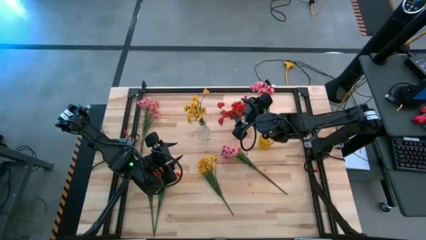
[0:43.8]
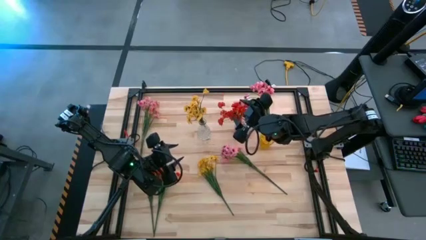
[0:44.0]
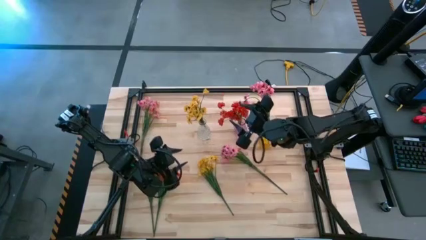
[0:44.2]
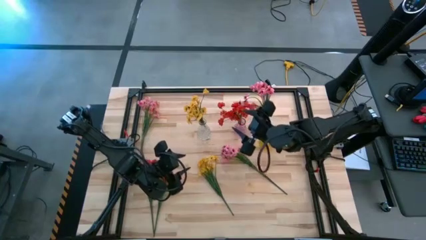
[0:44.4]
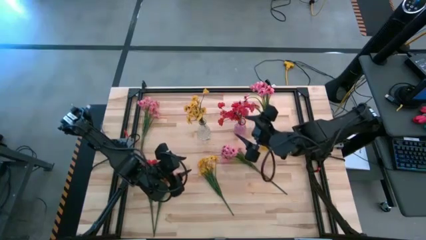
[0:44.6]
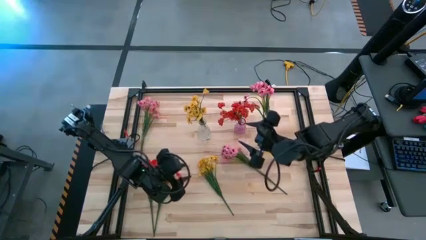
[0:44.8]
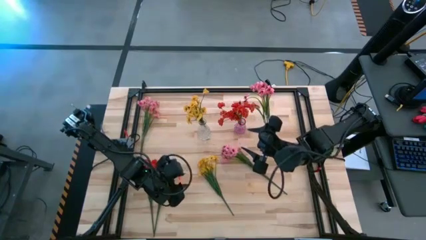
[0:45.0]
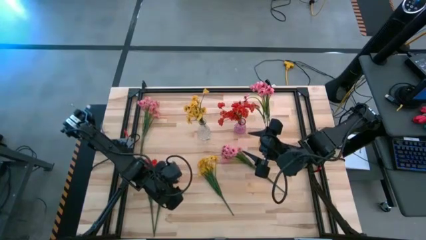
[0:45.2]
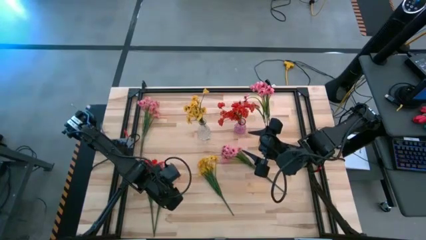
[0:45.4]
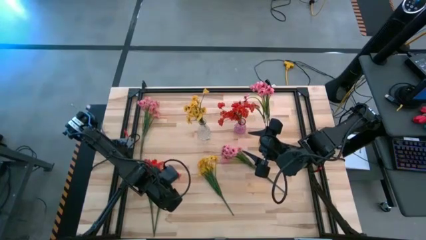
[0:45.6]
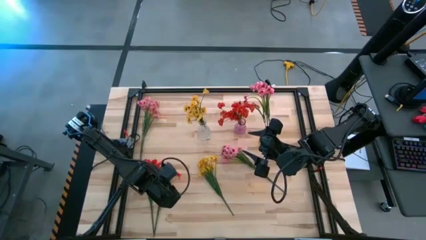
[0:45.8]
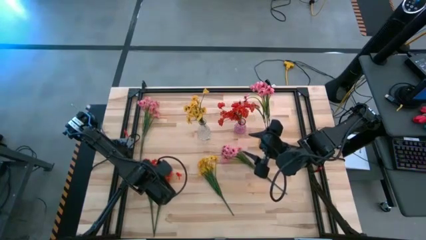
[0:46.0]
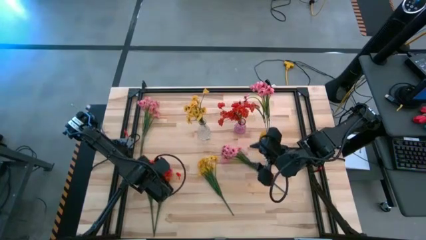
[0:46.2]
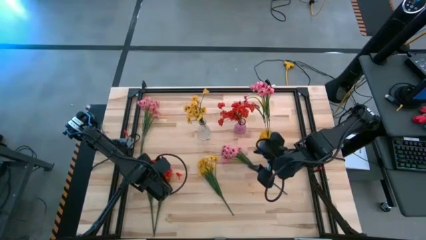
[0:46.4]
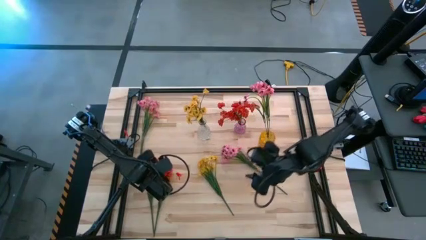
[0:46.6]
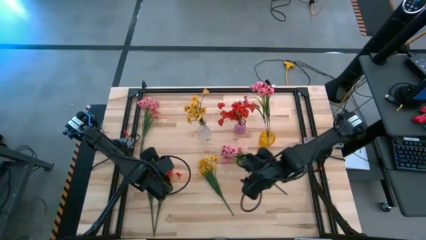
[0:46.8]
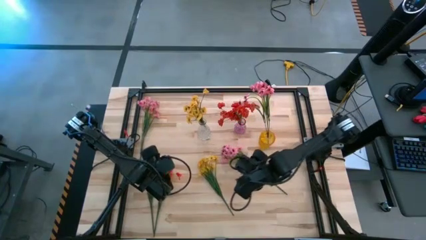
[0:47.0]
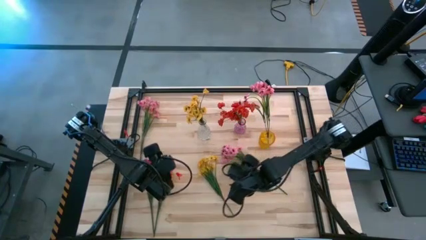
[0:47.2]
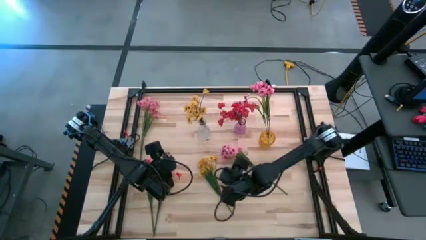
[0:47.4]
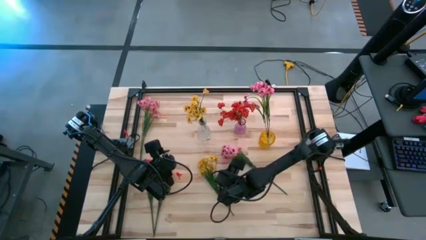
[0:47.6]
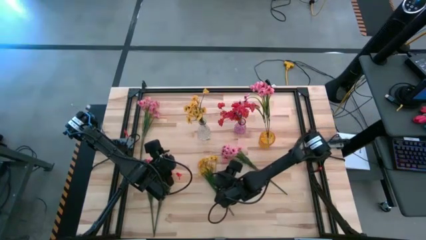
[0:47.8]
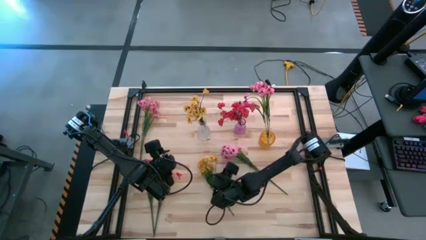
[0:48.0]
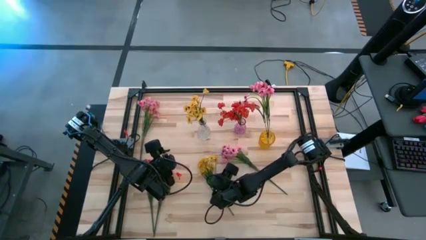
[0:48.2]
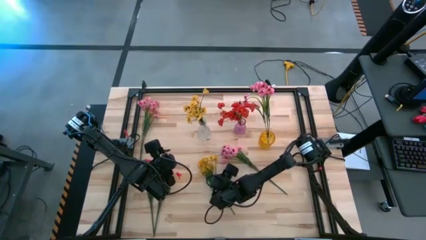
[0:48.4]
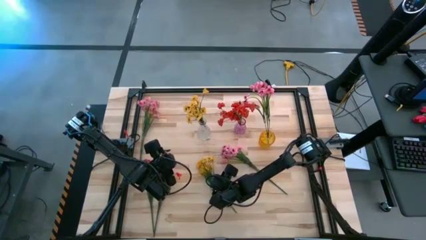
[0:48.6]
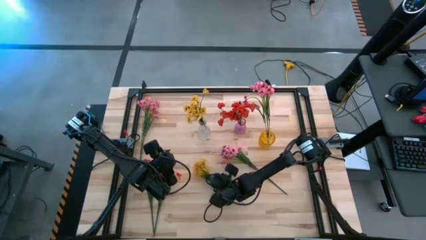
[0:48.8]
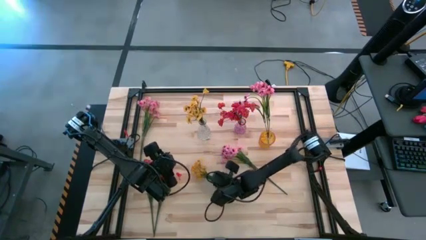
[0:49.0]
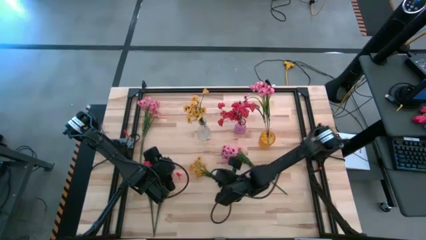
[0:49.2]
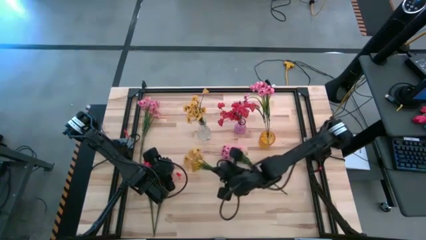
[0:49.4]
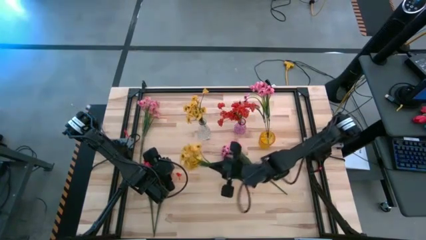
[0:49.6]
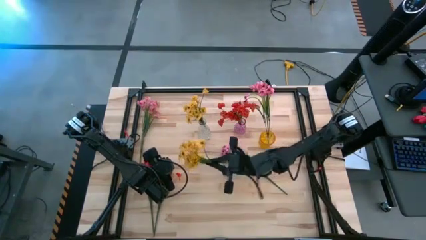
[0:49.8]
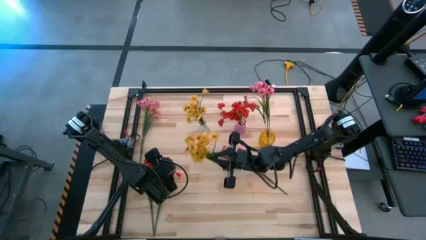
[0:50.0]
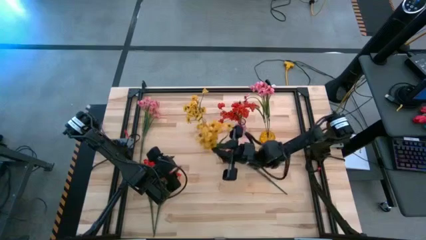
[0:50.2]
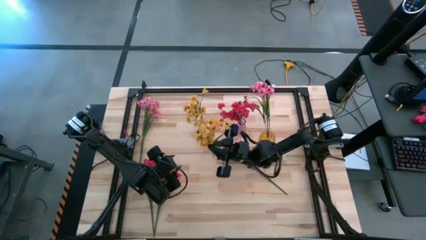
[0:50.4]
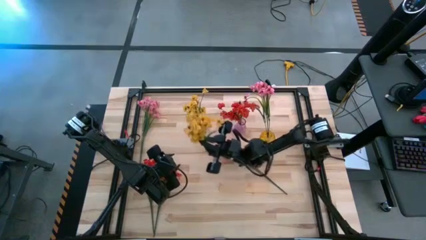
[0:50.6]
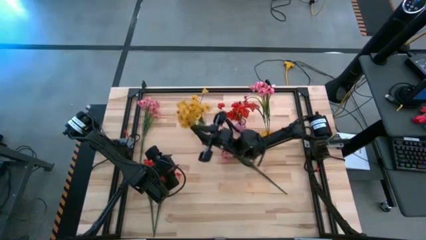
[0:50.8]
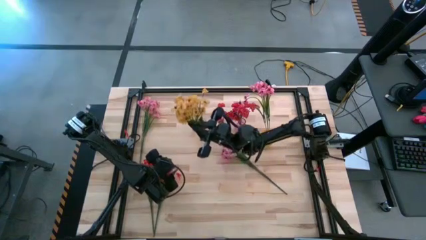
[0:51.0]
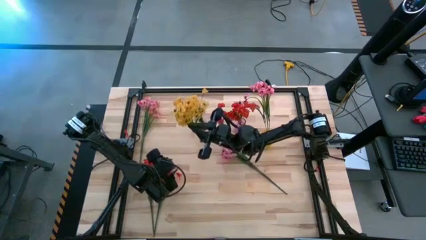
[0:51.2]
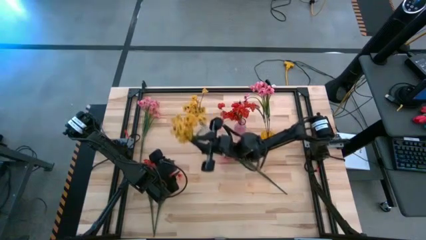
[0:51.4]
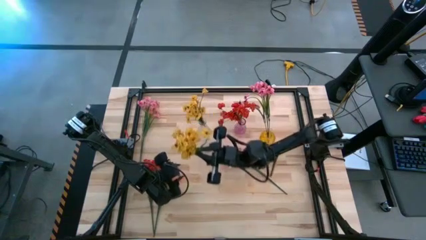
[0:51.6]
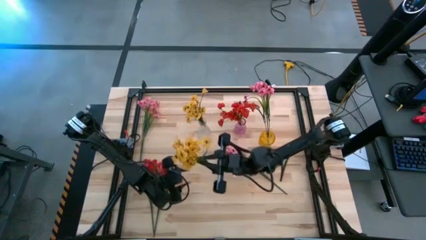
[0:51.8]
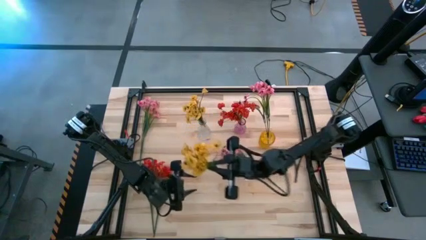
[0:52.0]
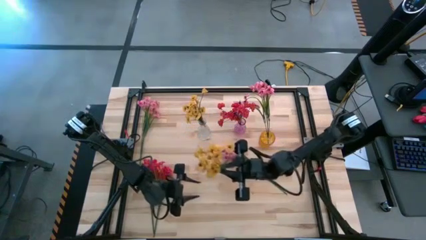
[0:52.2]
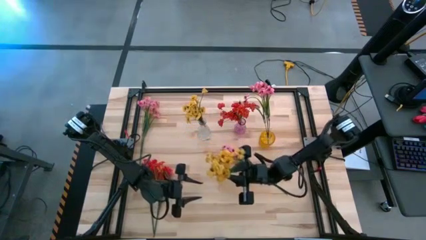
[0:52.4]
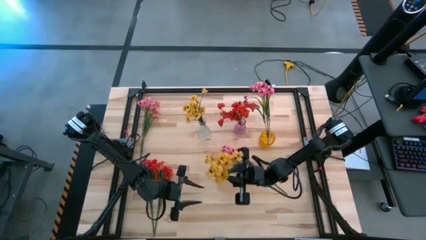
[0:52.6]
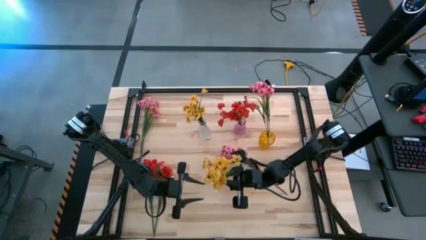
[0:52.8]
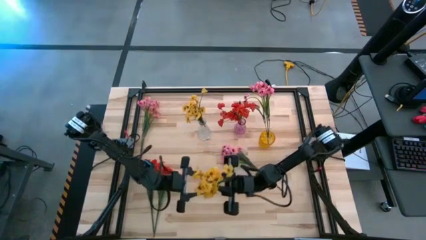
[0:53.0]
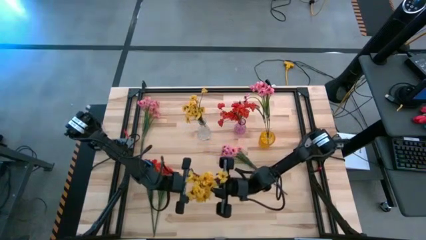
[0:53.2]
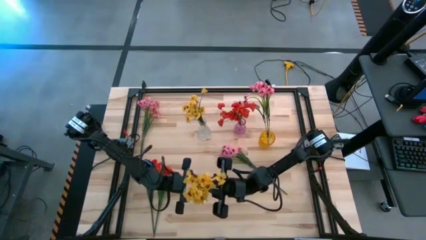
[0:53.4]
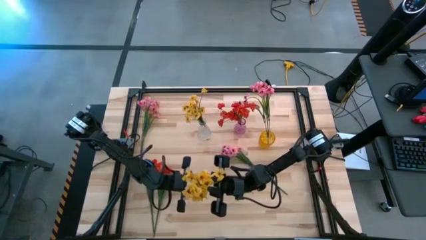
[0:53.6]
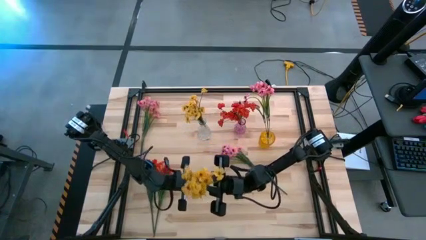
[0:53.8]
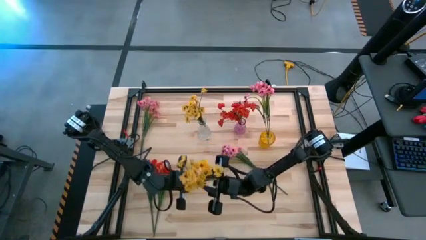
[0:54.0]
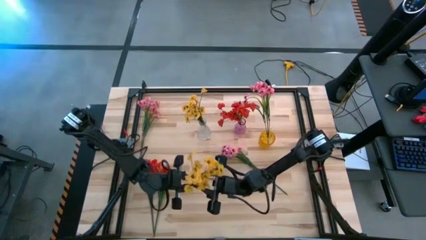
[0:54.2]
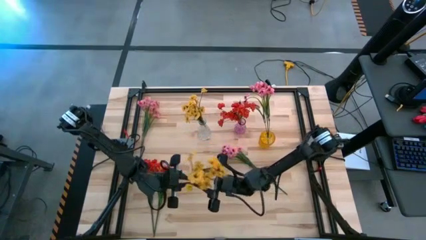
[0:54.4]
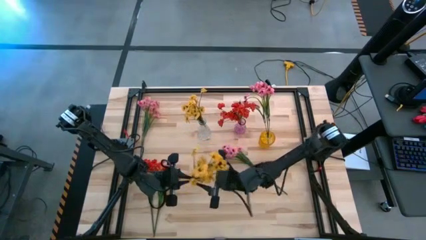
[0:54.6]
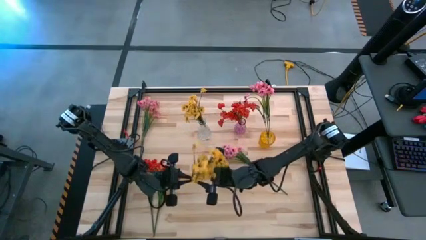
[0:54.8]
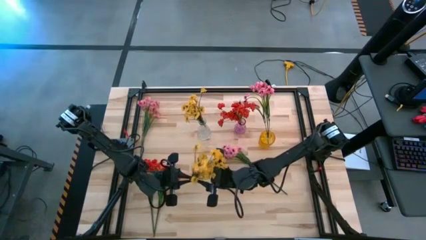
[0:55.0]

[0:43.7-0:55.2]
Task: Sort flowers into vase by color
Put the yellow flowers into the transparent vase

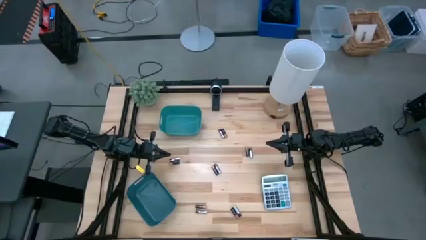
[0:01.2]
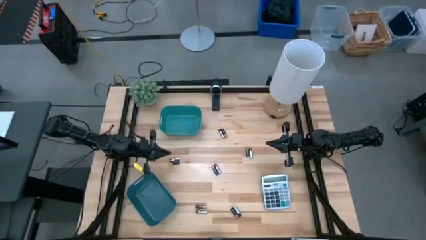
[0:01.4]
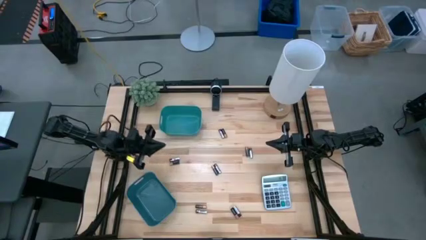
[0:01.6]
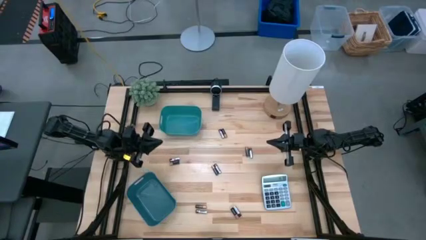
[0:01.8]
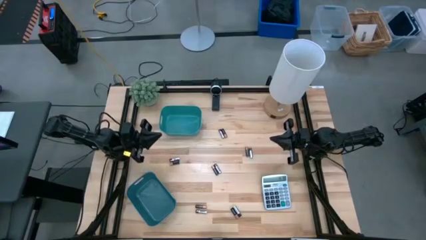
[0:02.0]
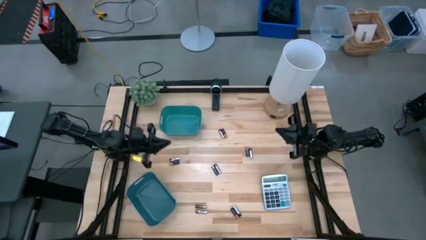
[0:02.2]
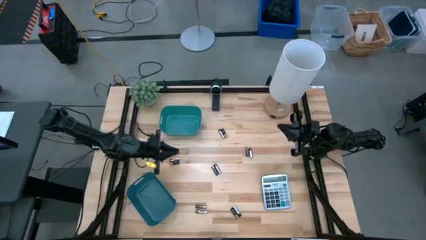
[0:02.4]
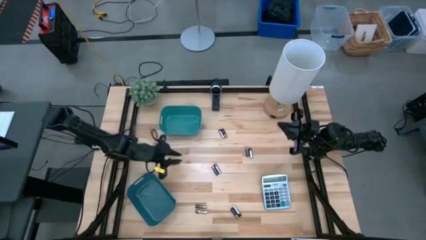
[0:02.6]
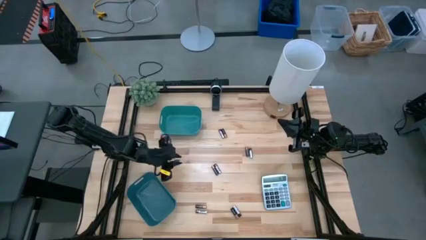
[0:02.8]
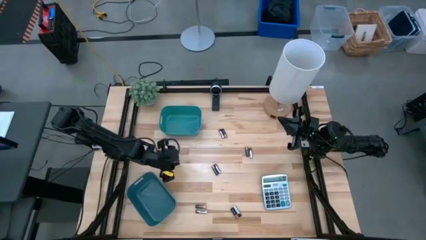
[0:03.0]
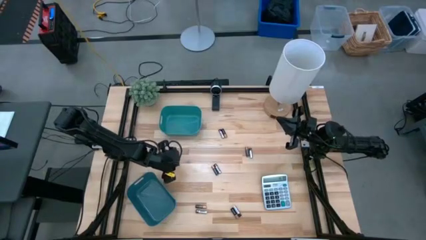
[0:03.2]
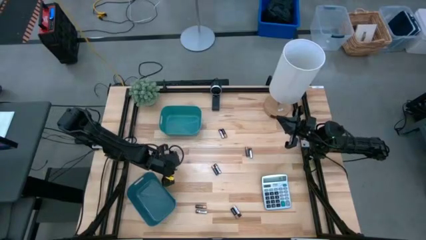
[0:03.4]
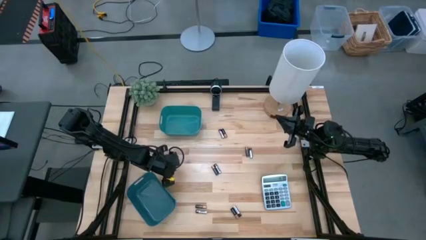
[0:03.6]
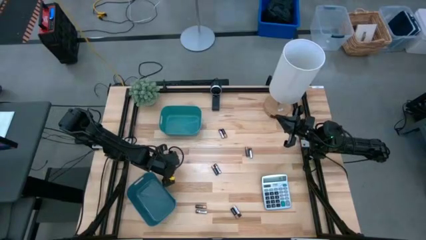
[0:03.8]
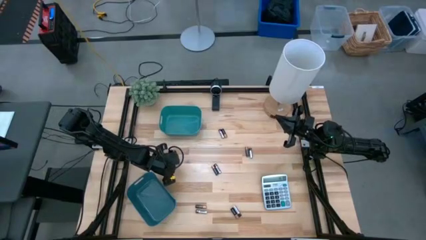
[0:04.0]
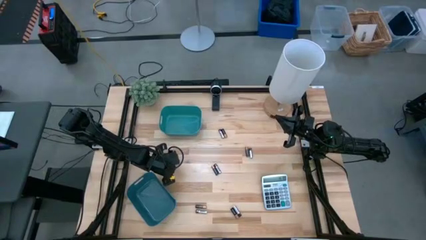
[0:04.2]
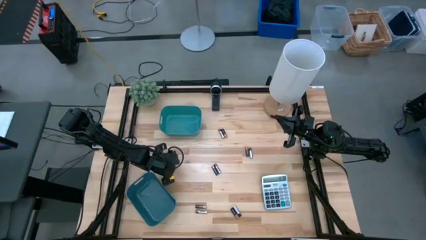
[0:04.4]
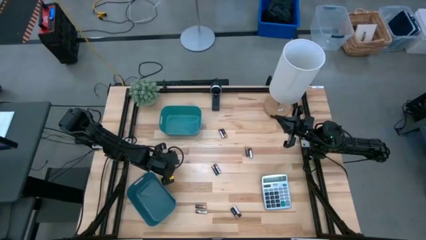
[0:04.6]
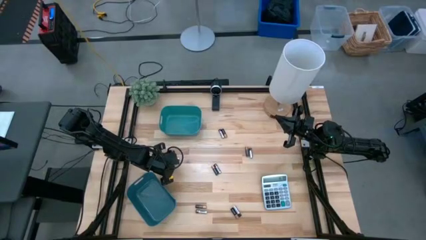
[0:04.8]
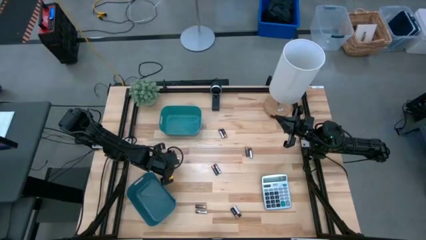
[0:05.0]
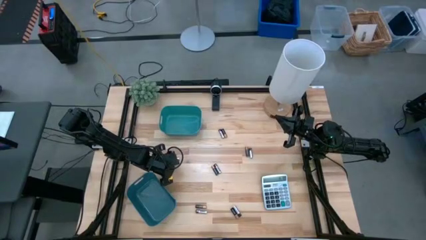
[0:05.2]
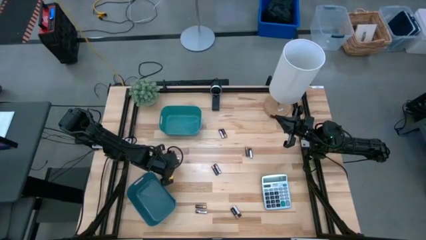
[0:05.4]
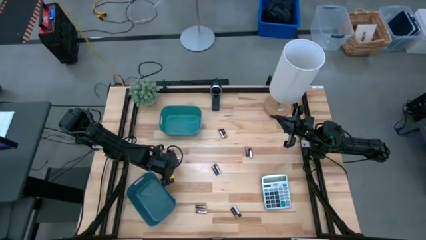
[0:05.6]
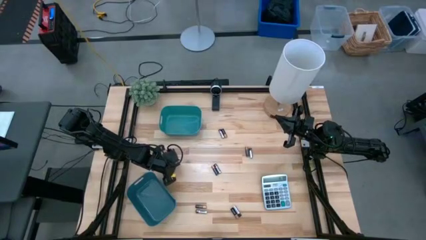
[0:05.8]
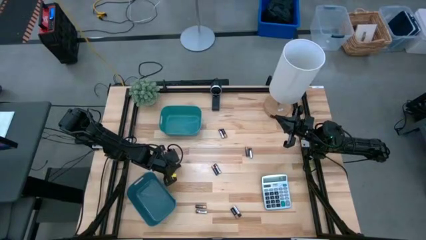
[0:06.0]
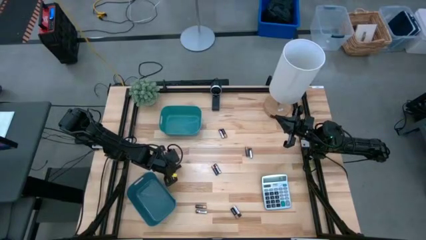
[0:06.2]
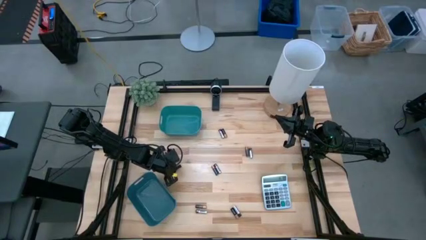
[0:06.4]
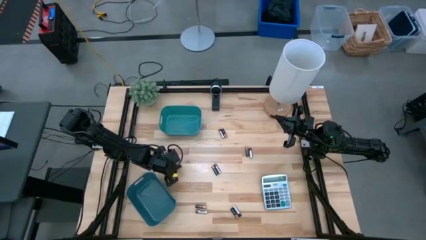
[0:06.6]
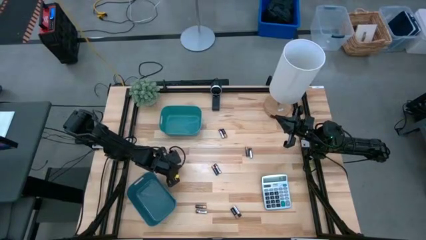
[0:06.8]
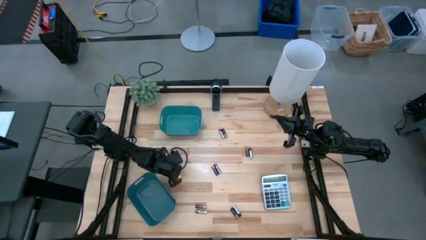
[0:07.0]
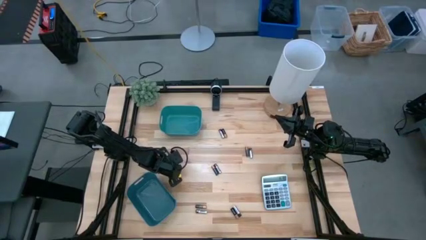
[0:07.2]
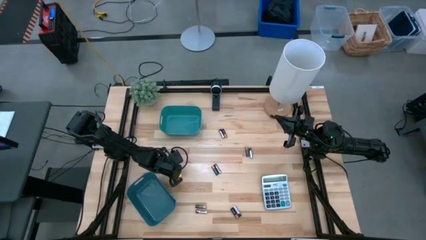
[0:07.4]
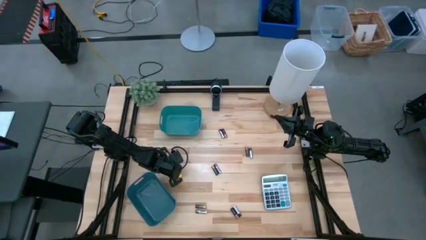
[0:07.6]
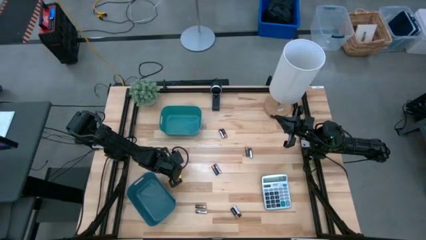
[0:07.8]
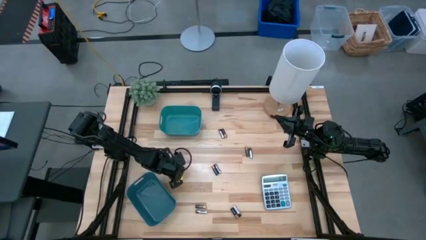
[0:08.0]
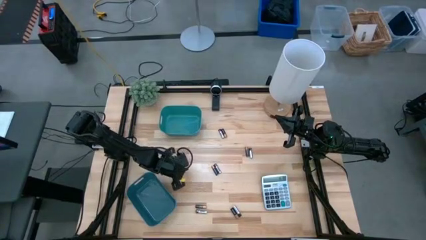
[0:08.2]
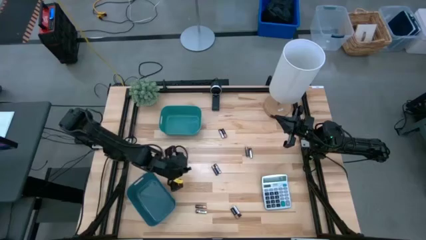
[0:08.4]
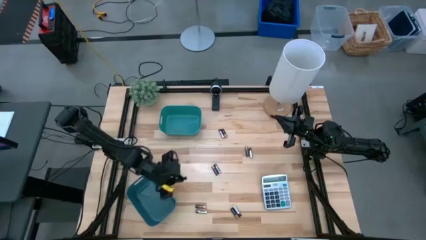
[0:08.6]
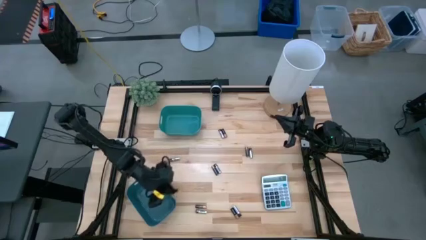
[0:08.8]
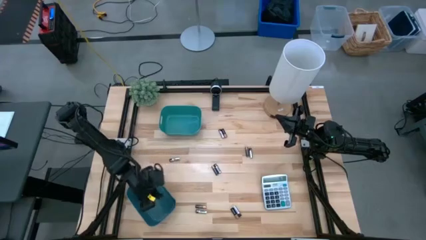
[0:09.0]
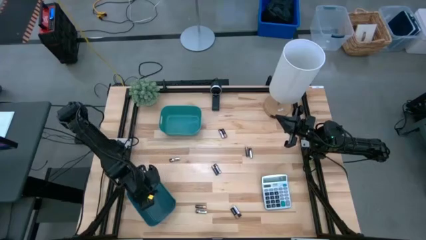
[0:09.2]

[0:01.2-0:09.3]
Task: Sort batteries
Put the black battery into the blue bin
